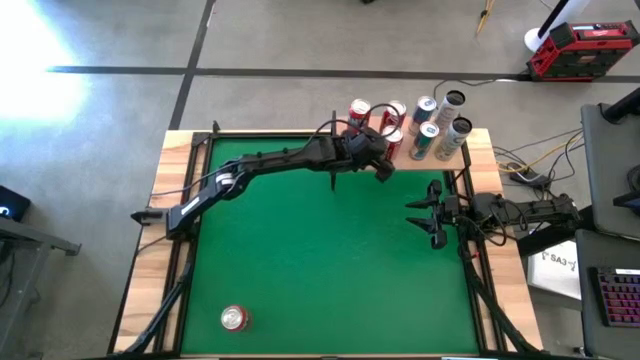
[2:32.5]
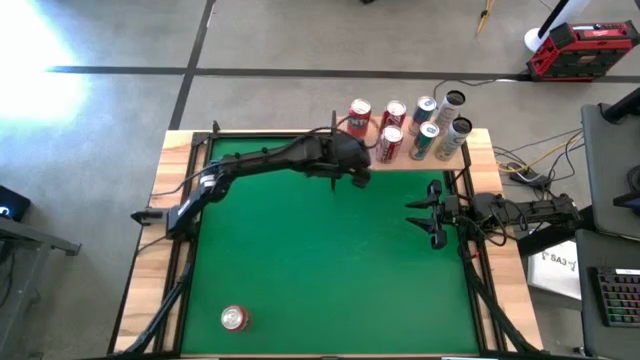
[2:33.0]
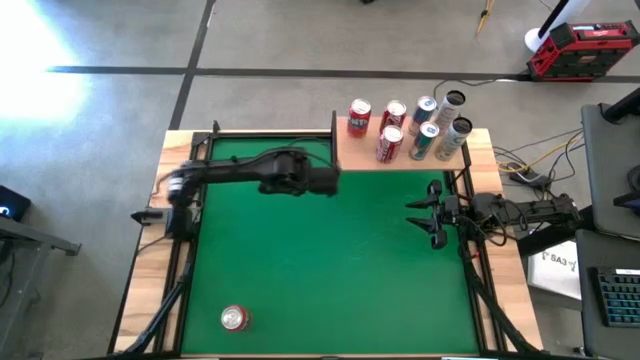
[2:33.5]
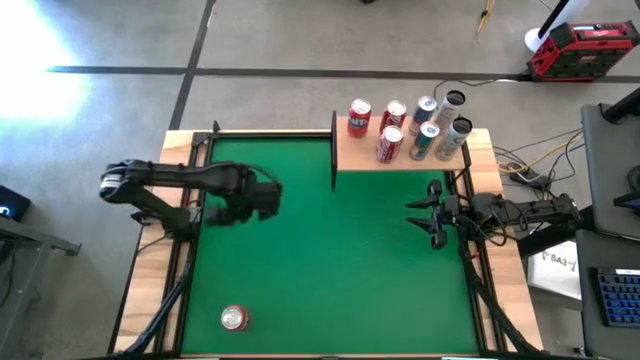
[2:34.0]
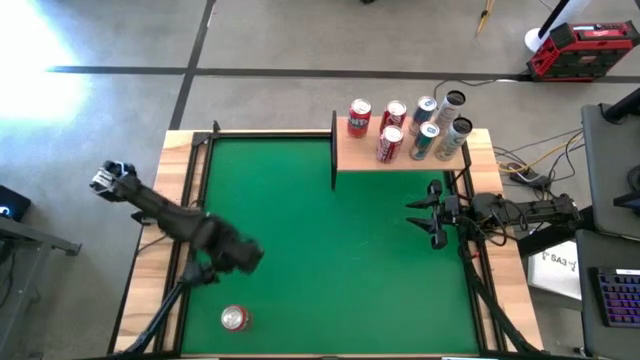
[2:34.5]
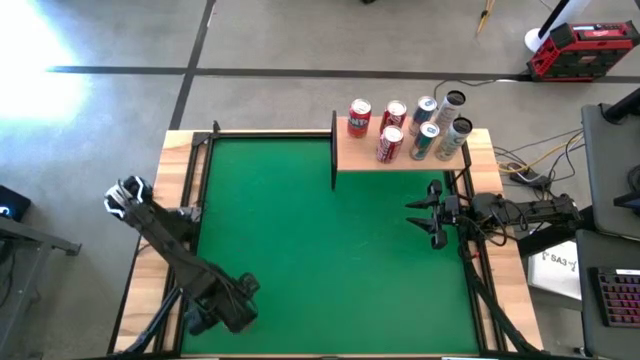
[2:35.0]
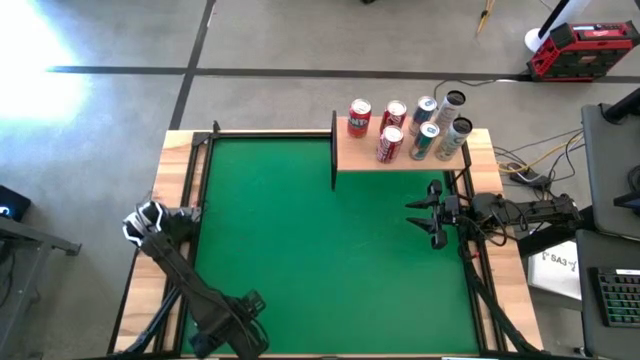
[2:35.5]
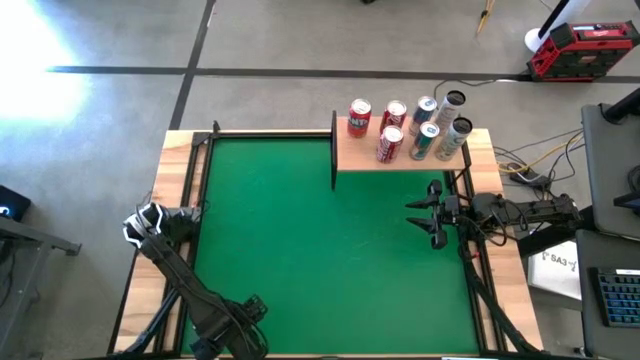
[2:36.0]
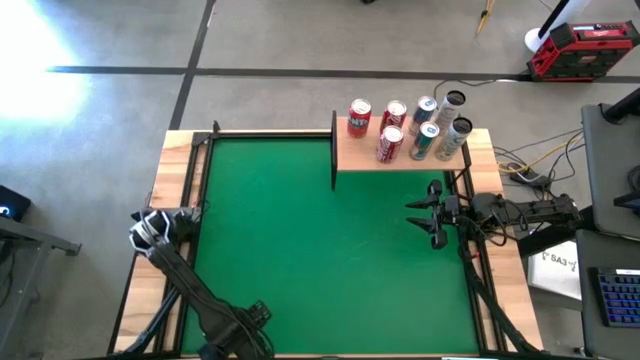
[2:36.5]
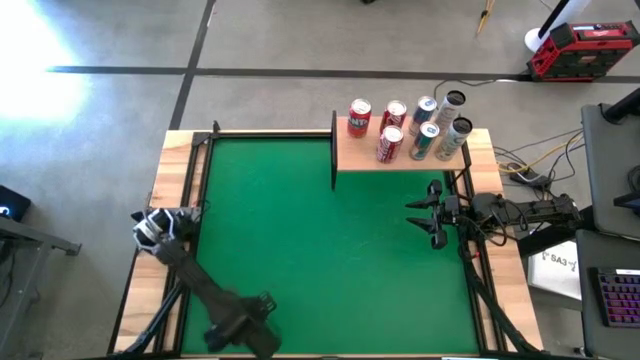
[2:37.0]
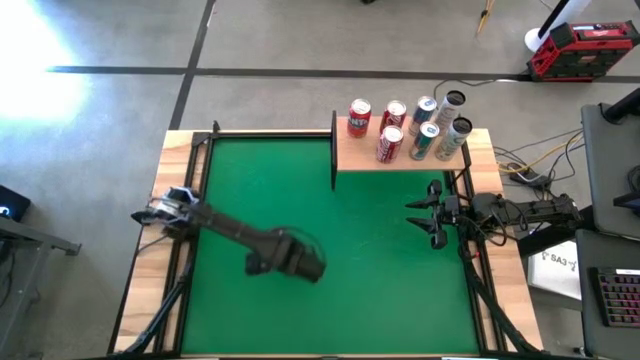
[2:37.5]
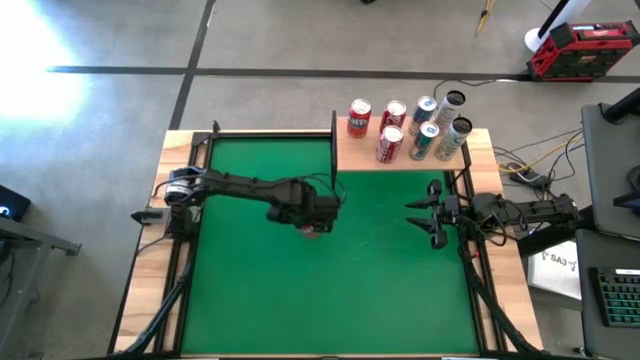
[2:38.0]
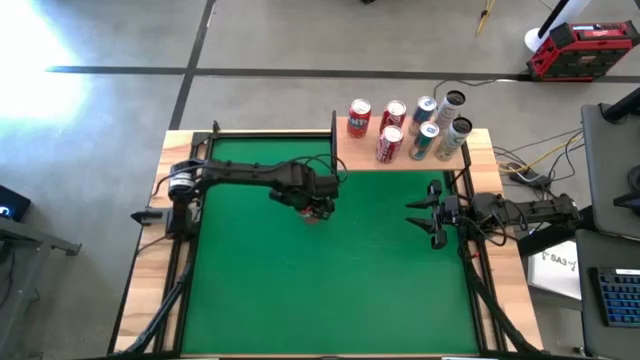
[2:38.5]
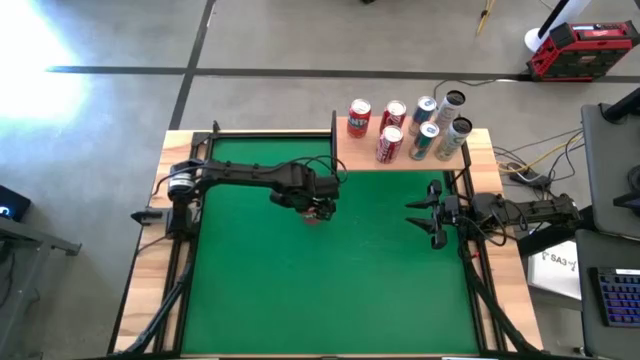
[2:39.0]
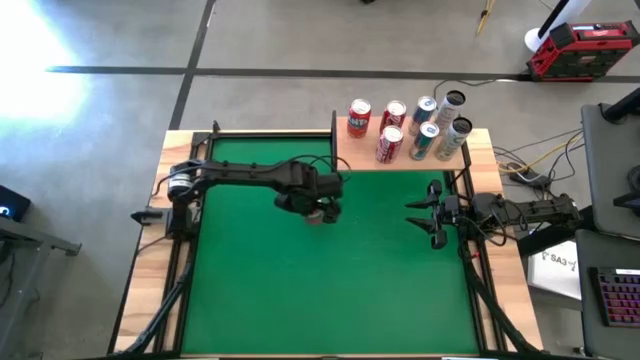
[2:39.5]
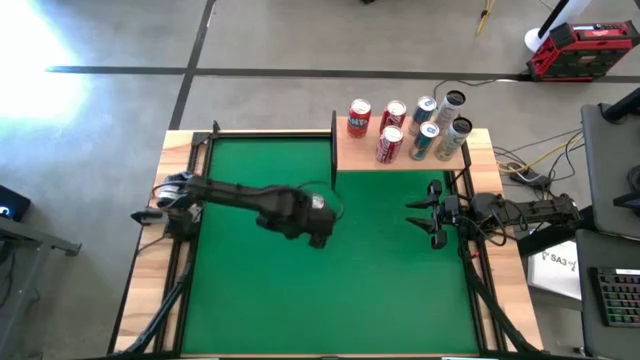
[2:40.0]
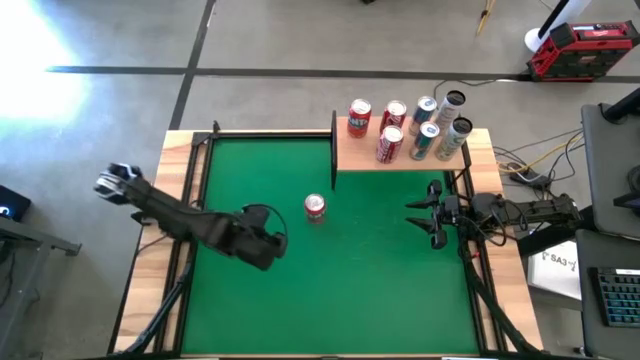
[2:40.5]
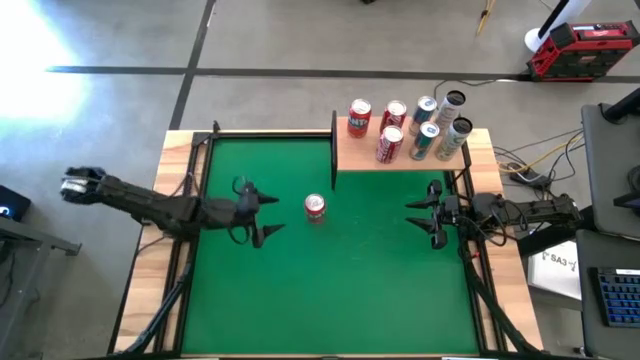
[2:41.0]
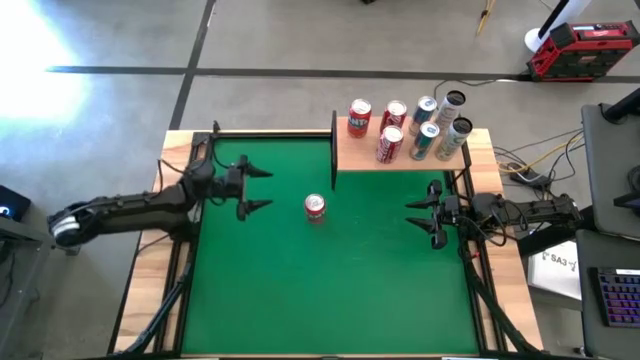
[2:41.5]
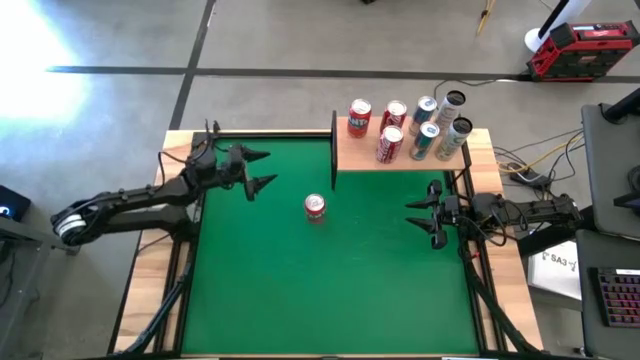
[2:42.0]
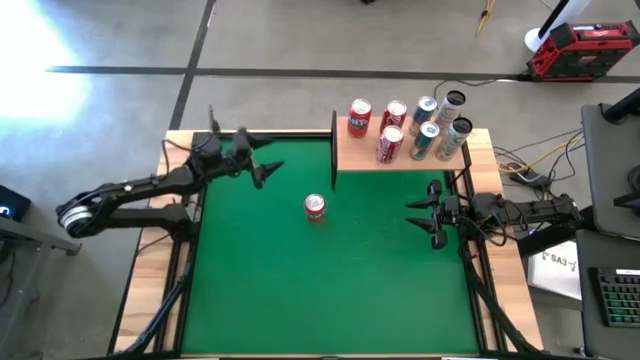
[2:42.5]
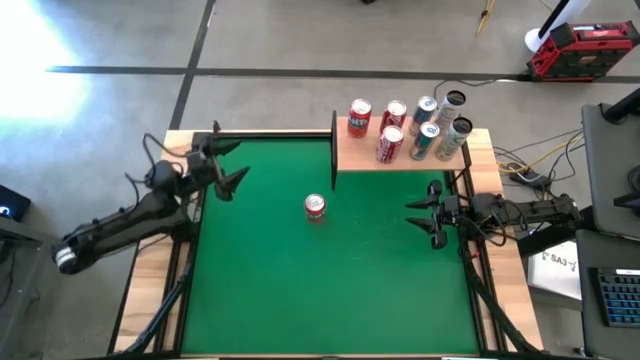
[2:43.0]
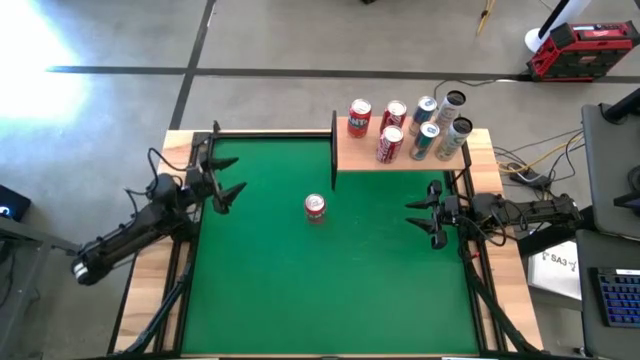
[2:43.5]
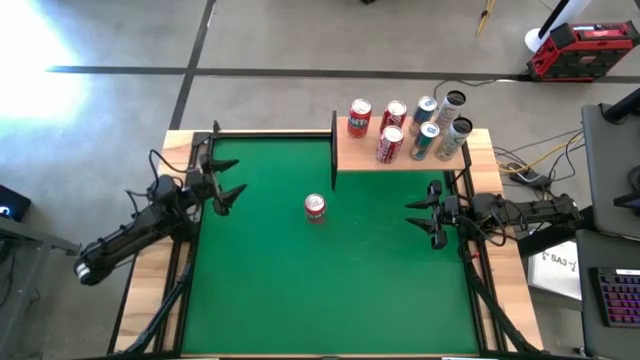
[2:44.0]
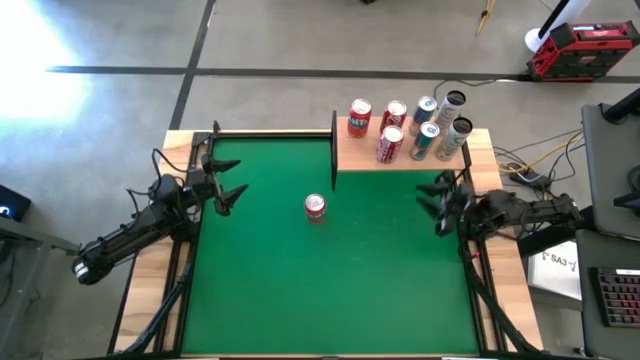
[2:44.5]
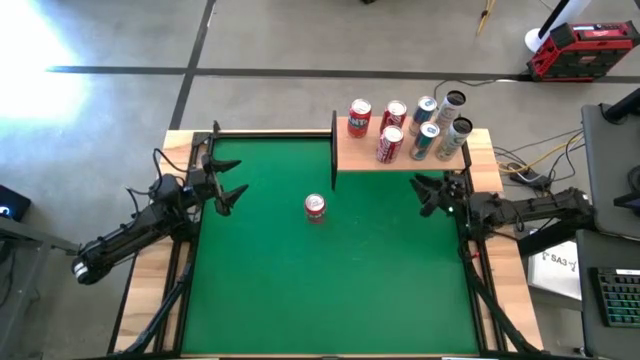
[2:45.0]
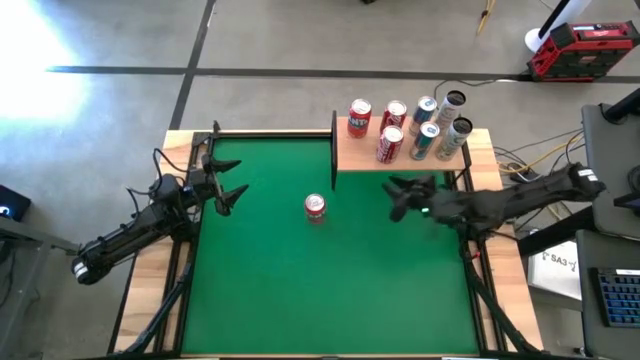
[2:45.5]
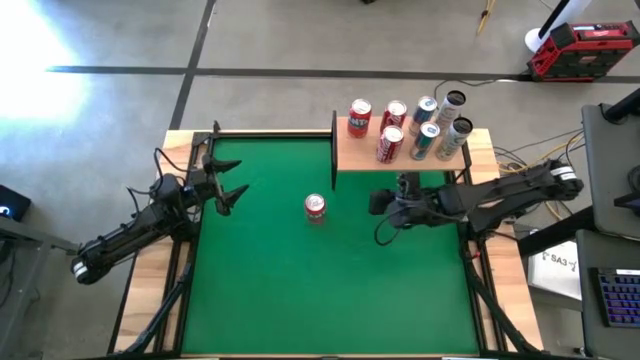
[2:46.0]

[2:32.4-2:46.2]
Task: Place canned beverage on shelf
Put the red soda can on the shelf aligned with the other red soda can

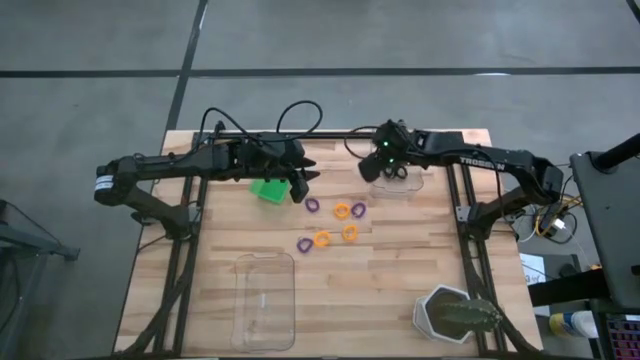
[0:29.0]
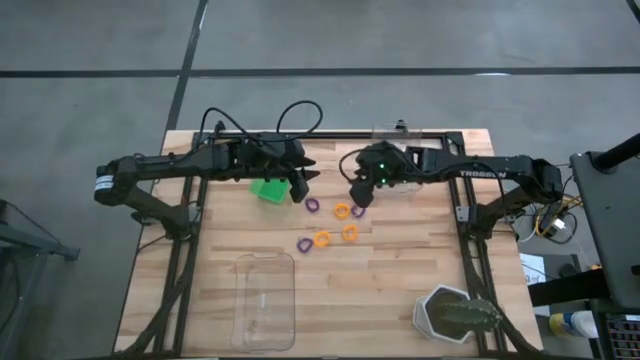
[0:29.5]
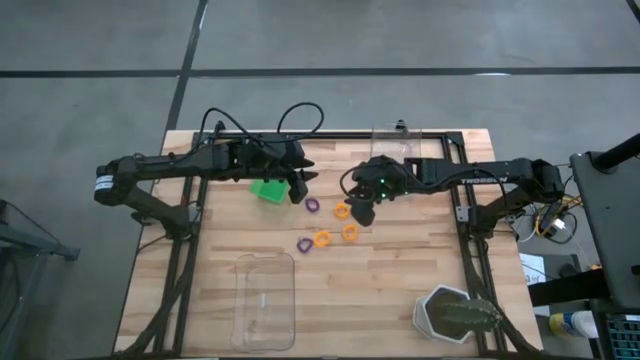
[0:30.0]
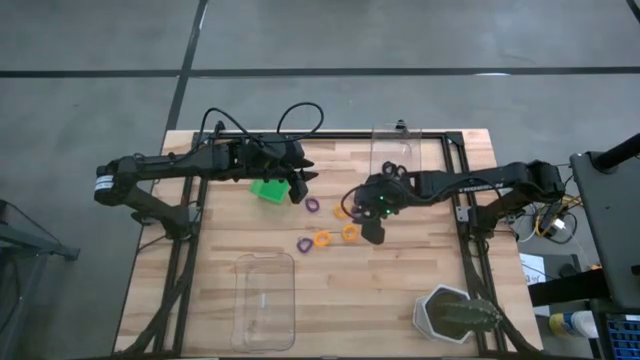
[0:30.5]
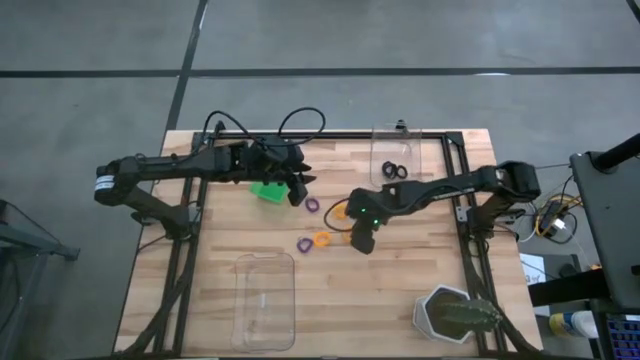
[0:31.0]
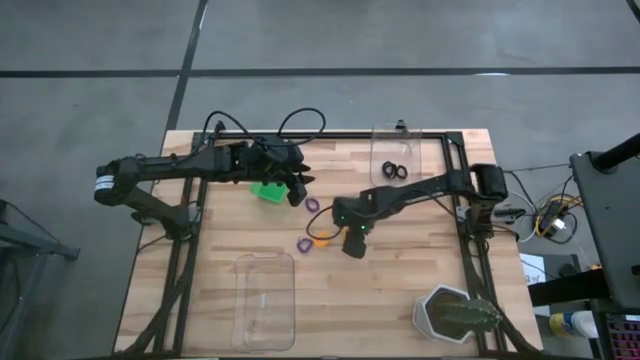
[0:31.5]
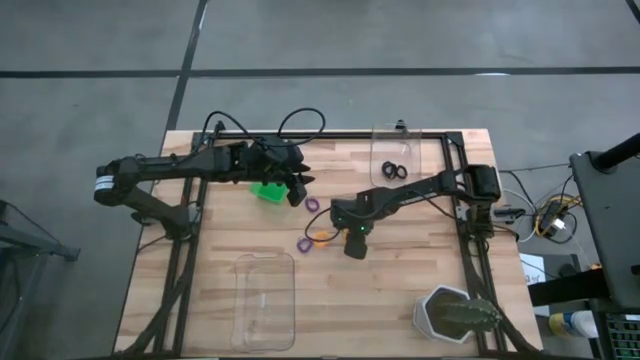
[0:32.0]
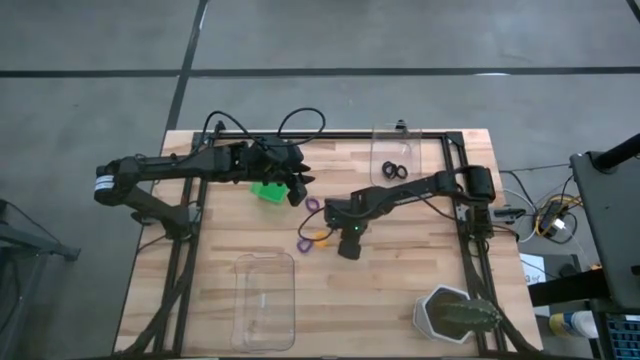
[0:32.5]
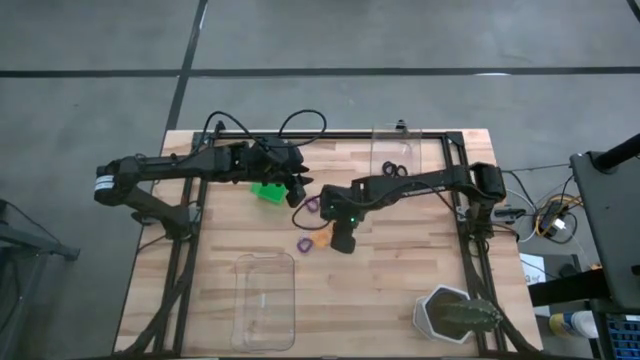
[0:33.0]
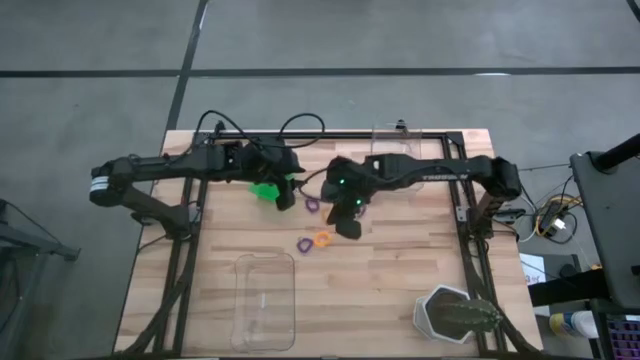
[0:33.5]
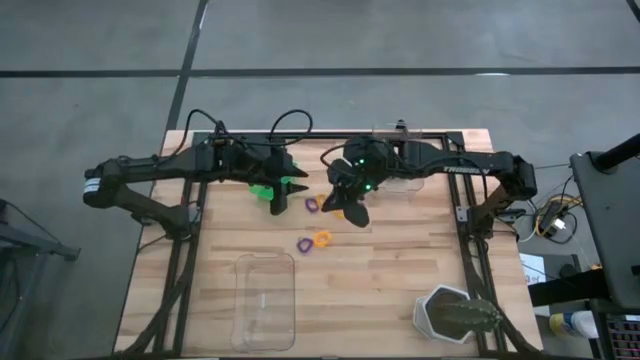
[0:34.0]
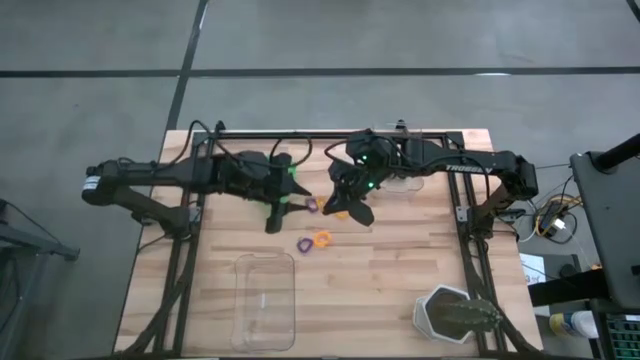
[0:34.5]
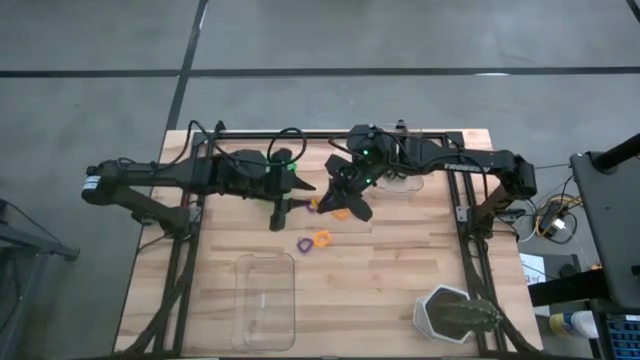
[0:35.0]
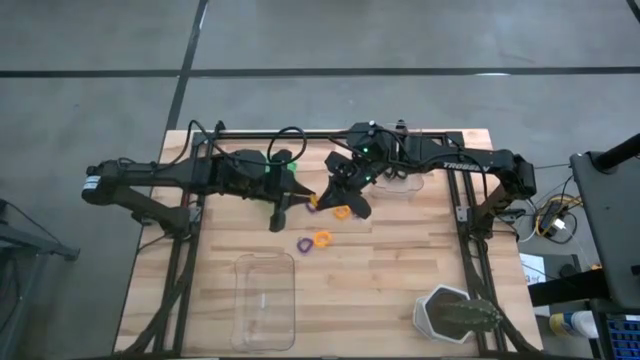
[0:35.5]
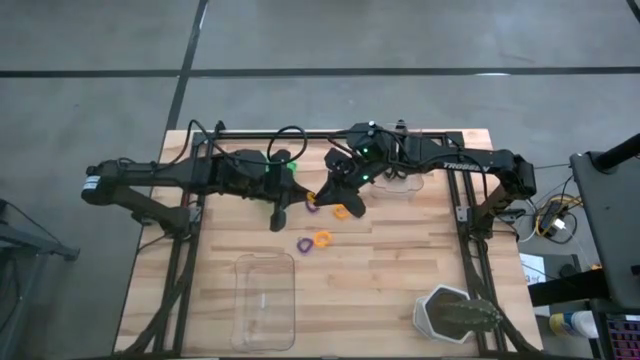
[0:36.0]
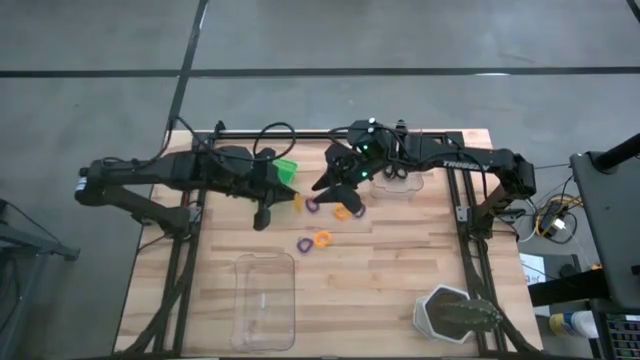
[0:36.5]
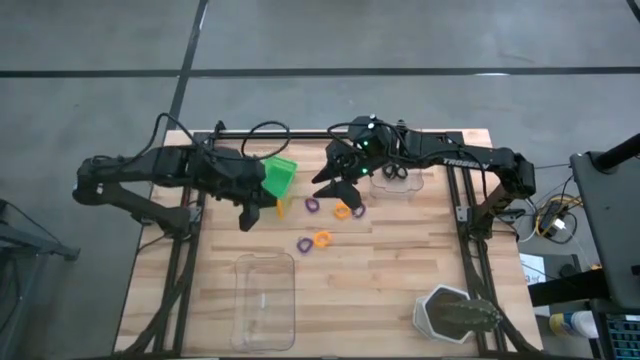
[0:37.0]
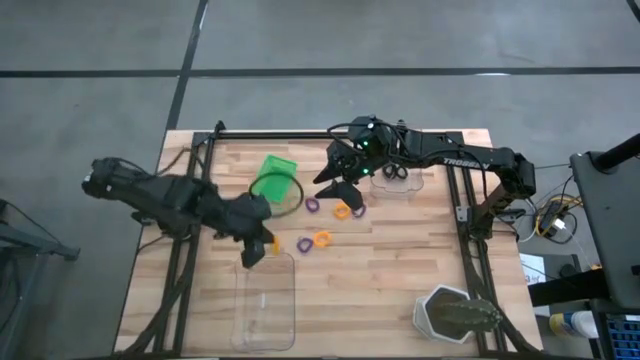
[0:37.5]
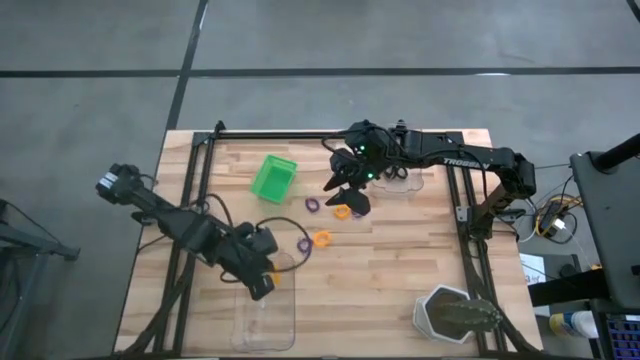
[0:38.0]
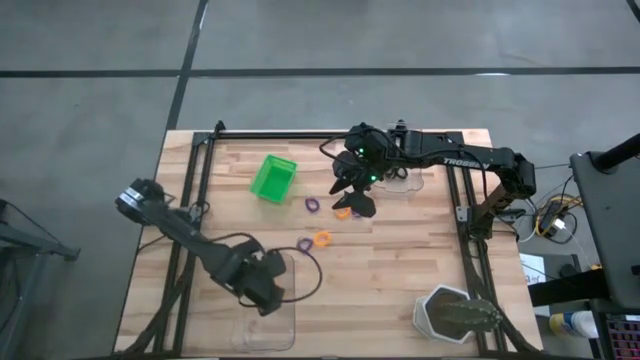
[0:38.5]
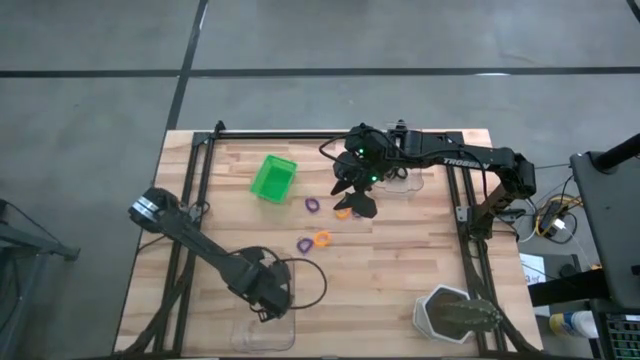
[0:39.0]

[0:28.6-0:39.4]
Task: Sort spring keychains
Put the bottom right yellow spring keychain into the bottom transparent bin
